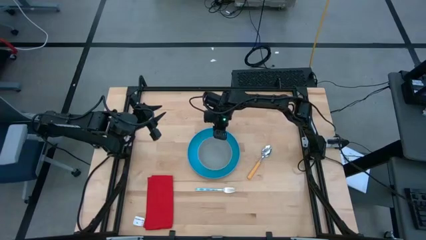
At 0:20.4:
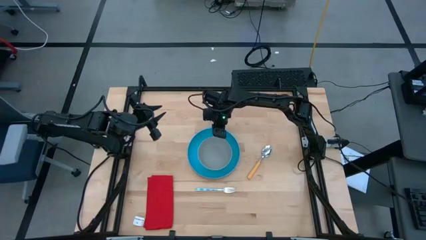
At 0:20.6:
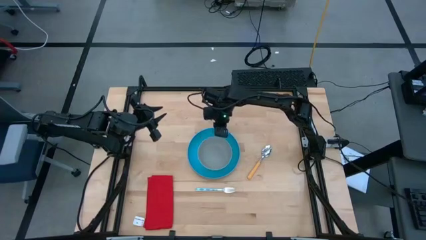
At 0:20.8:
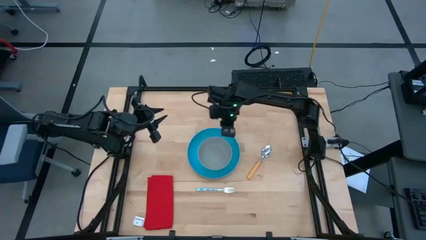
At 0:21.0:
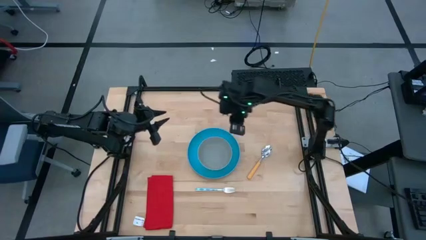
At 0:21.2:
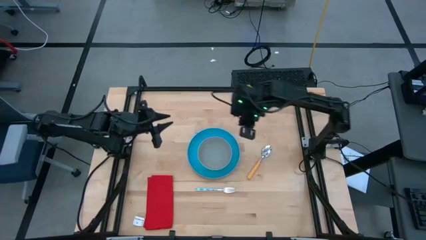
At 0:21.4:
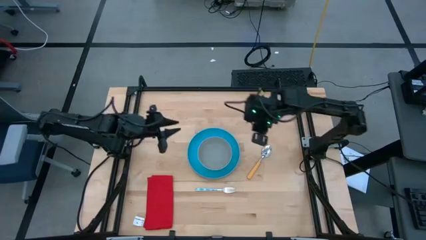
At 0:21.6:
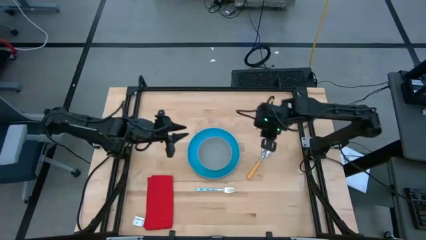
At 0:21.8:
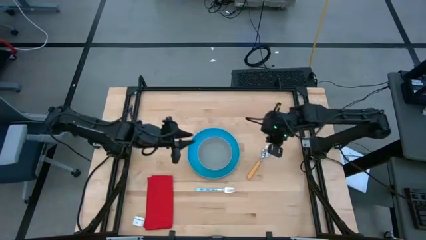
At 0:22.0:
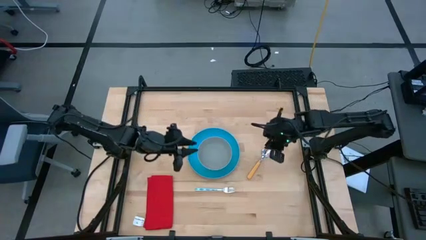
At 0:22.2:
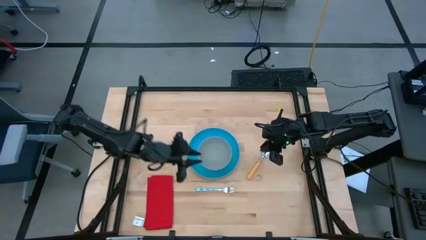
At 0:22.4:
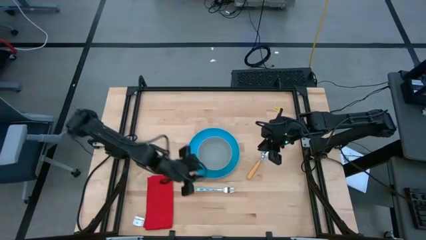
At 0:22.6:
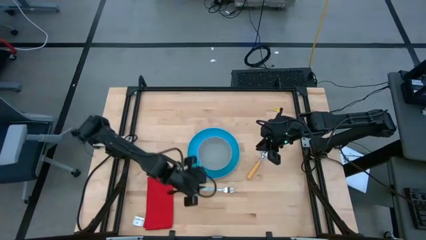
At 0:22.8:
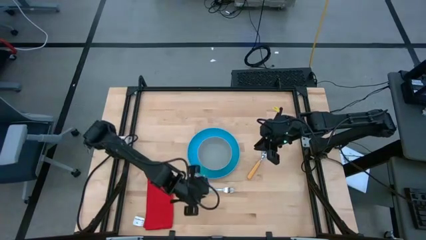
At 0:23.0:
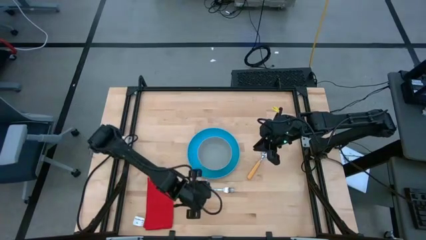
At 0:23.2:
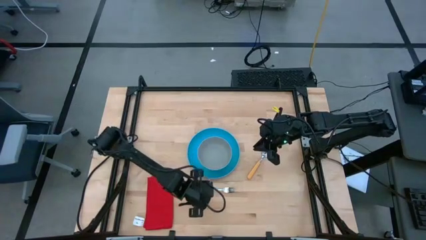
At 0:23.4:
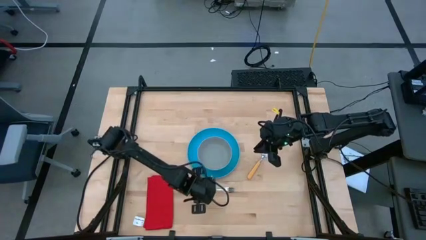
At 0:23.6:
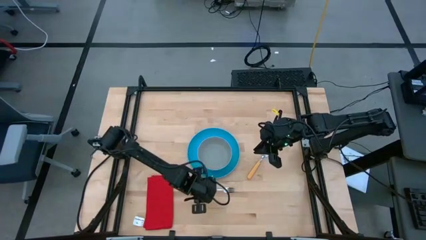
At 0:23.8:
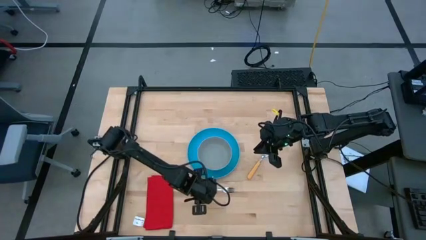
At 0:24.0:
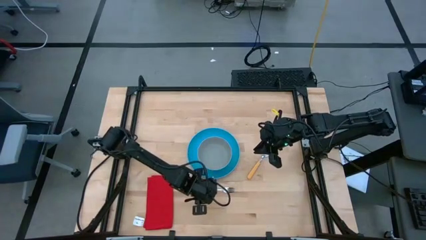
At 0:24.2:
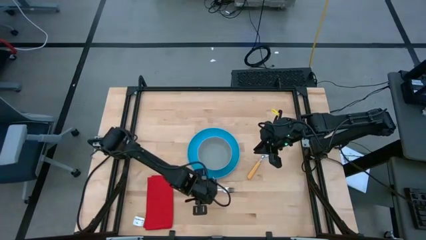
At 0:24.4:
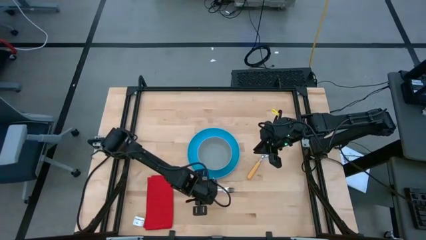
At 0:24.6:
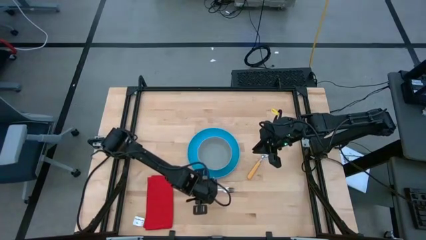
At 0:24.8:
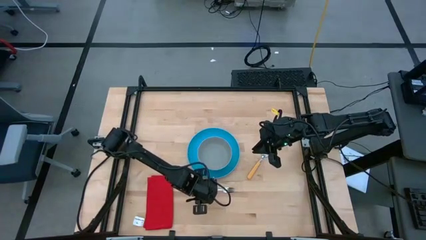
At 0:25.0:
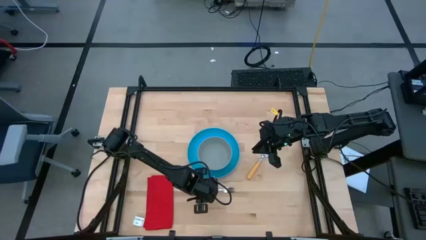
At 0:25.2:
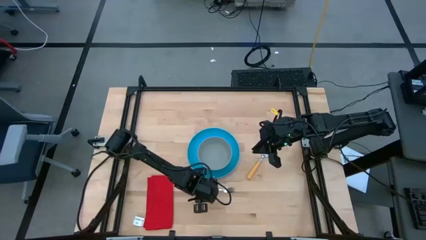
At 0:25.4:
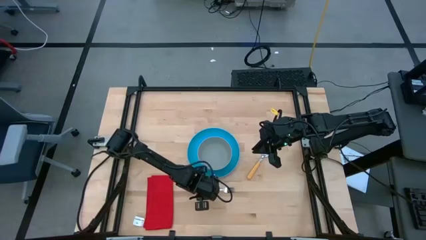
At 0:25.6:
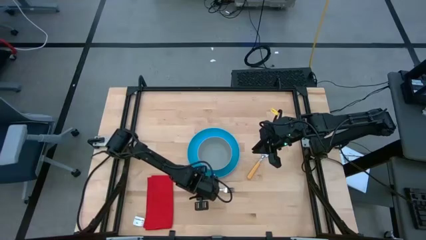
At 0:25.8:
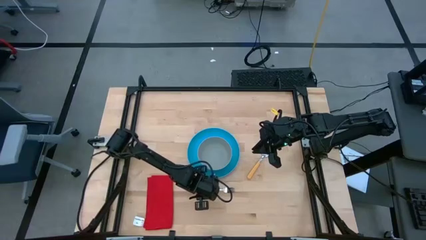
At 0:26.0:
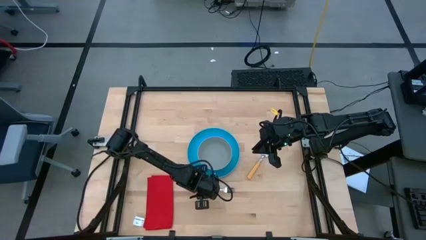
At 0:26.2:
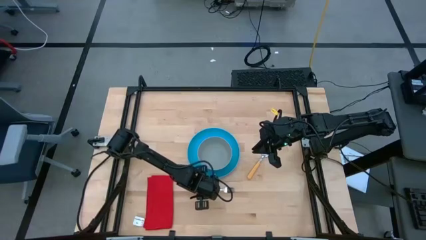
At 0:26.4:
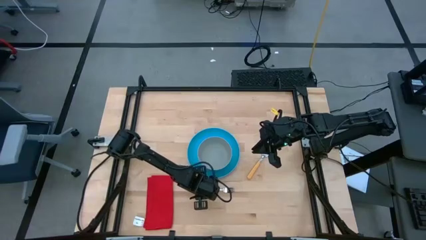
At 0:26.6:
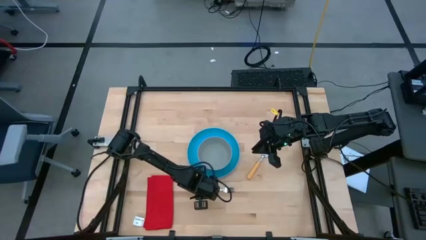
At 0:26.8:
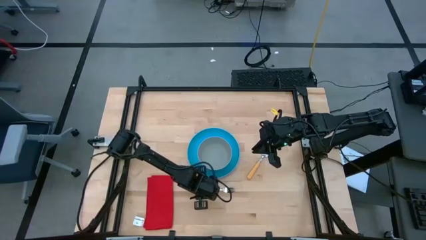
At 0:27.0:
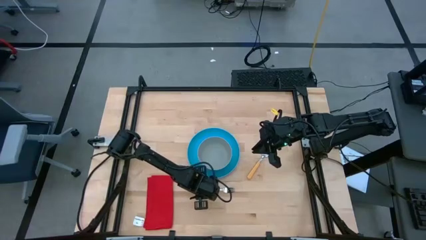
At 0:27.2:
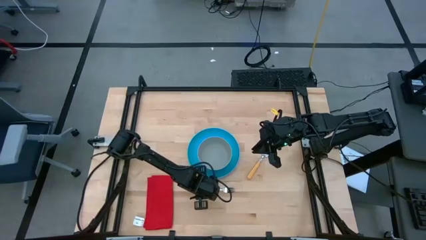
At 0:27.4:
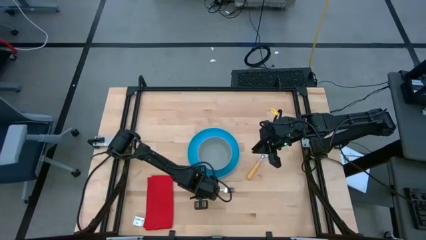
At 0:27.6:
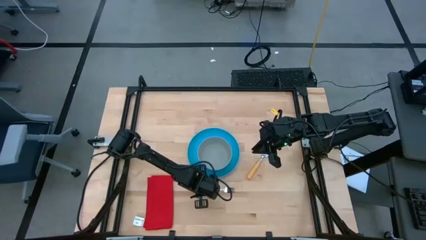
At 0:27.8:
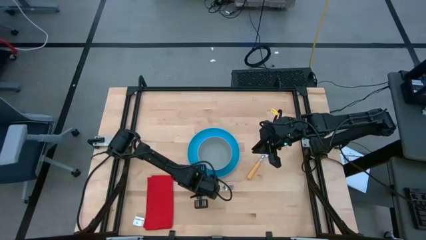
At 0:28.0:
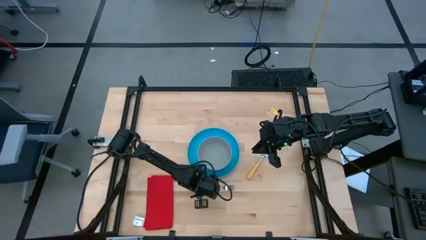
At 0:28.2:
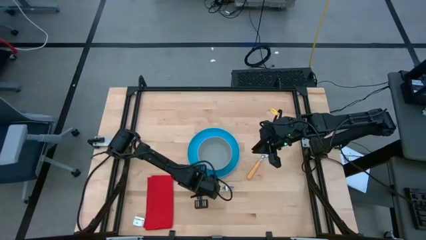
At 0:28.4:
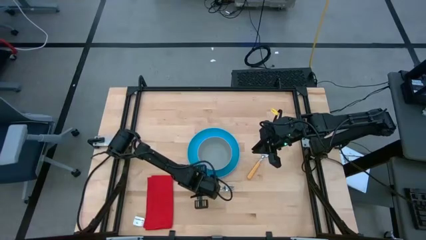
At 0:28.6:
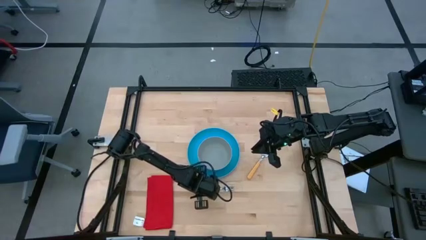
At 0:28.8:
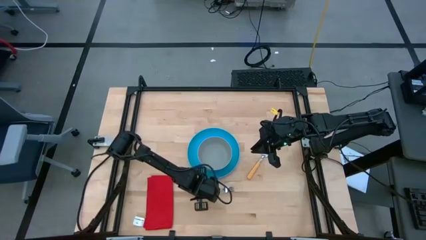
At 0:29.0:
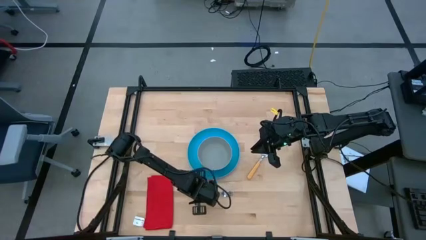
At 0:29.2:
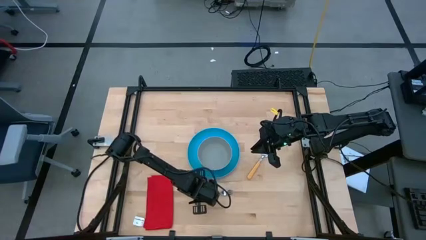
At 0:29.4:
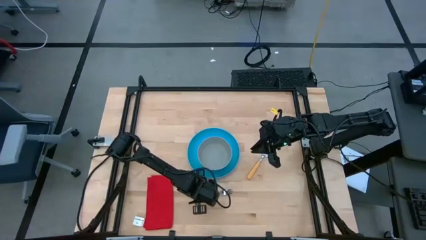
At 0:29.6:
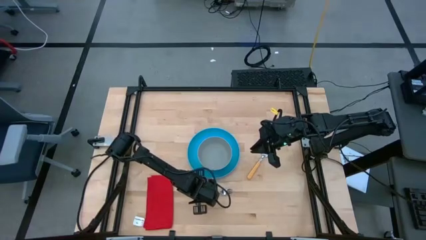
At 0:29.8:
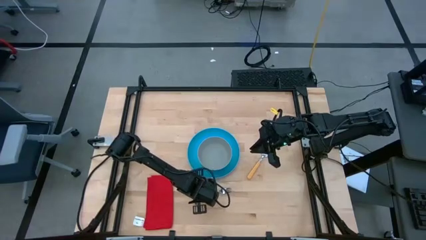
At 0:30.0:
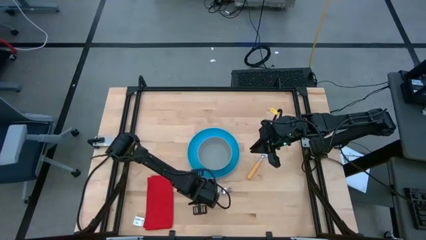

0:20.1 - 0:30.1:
Task: Set table place
Put the blue fork to the left of the blue plate
